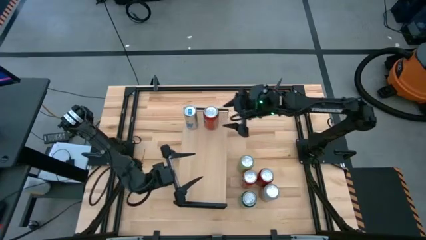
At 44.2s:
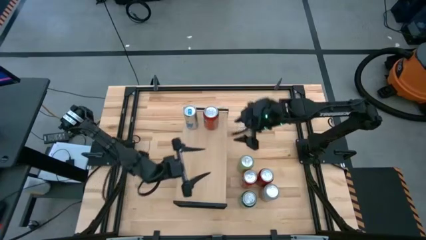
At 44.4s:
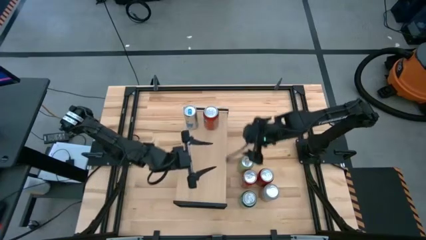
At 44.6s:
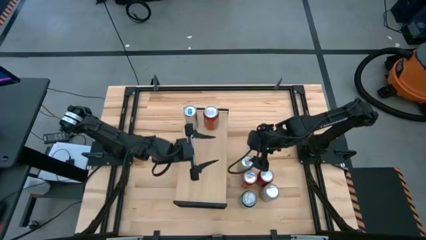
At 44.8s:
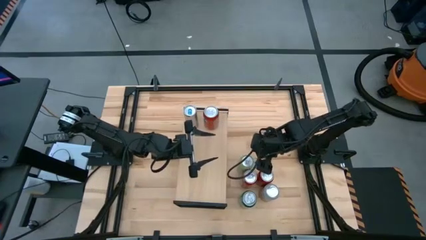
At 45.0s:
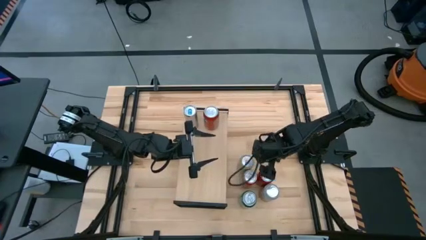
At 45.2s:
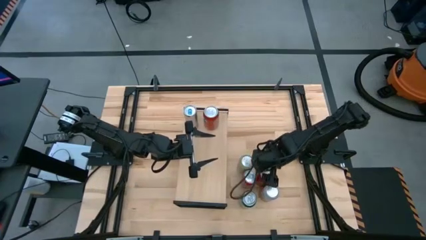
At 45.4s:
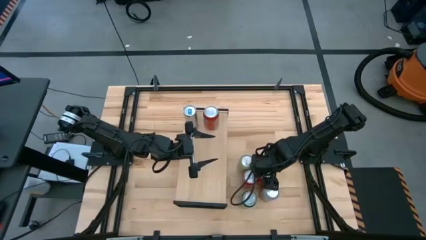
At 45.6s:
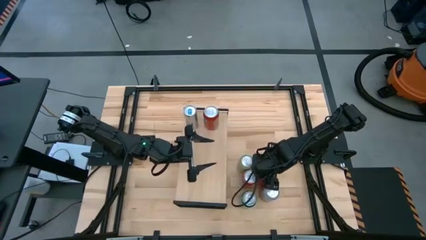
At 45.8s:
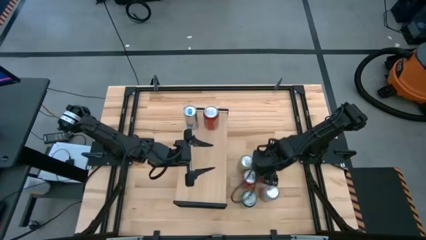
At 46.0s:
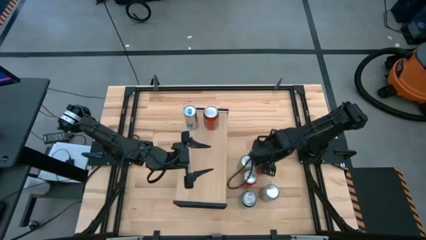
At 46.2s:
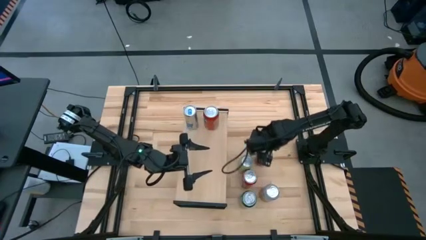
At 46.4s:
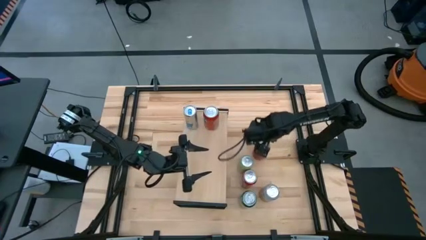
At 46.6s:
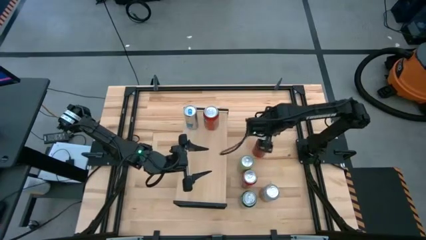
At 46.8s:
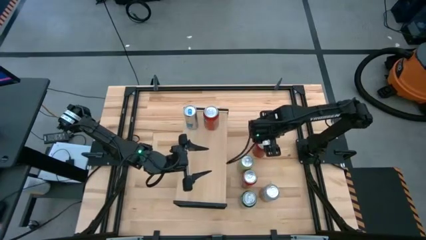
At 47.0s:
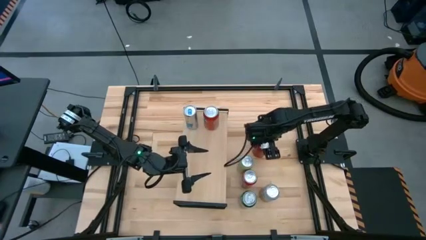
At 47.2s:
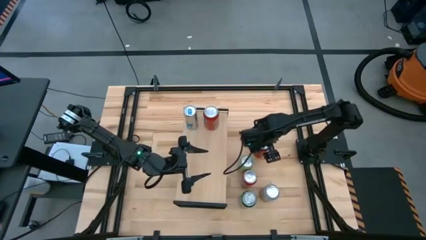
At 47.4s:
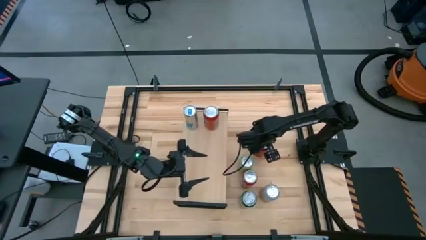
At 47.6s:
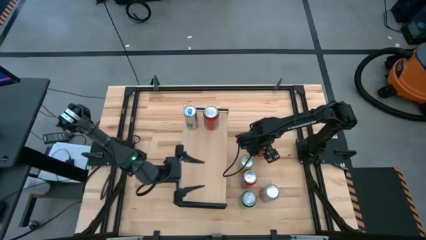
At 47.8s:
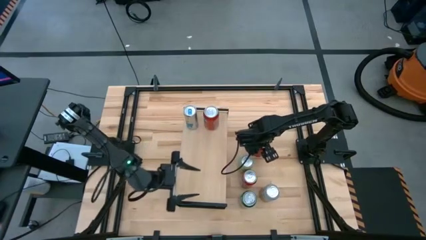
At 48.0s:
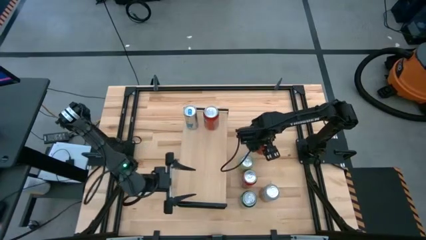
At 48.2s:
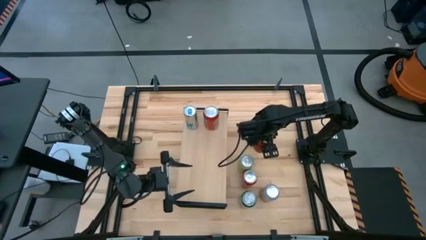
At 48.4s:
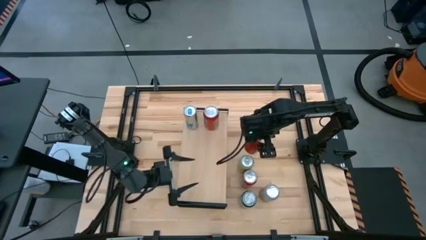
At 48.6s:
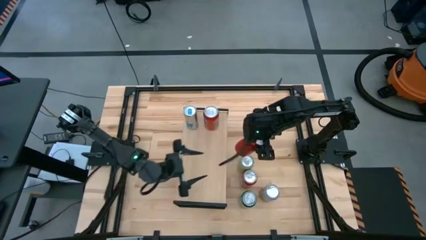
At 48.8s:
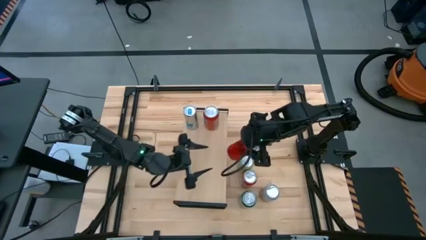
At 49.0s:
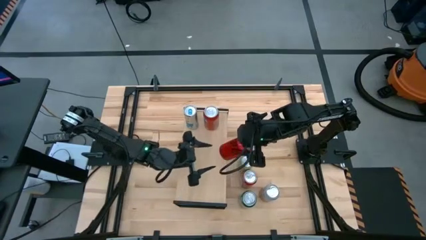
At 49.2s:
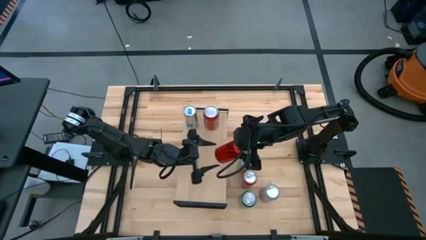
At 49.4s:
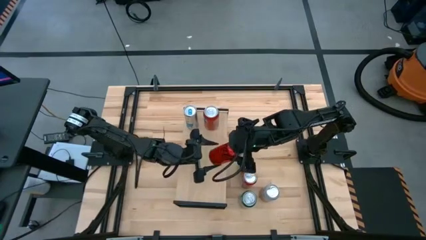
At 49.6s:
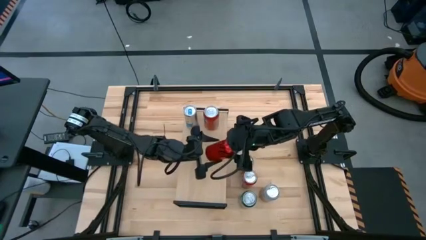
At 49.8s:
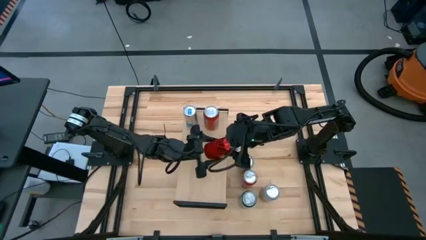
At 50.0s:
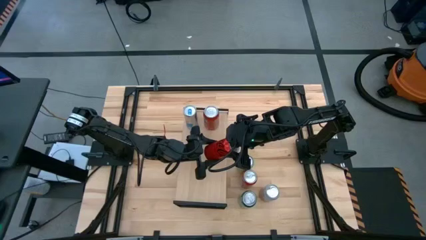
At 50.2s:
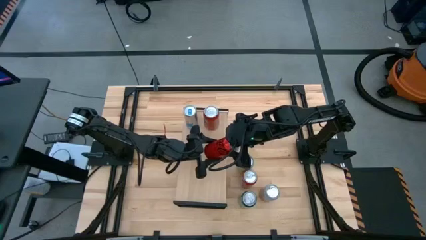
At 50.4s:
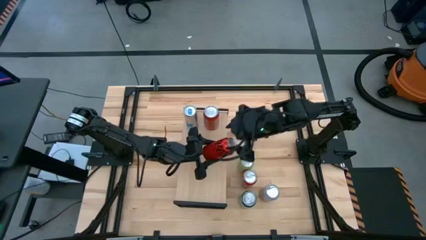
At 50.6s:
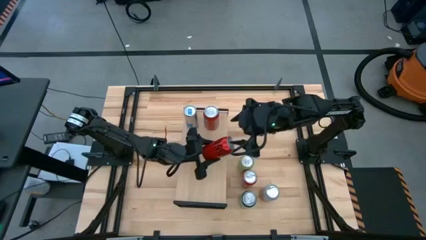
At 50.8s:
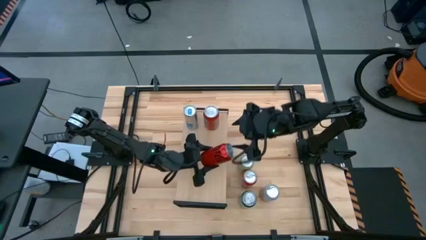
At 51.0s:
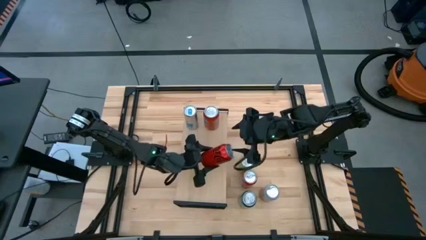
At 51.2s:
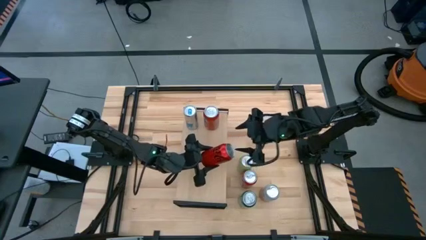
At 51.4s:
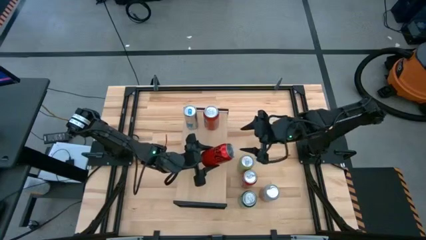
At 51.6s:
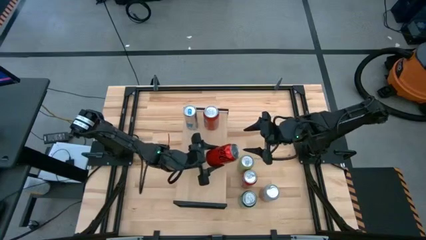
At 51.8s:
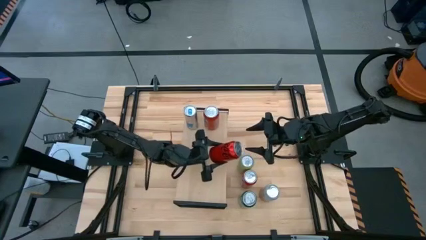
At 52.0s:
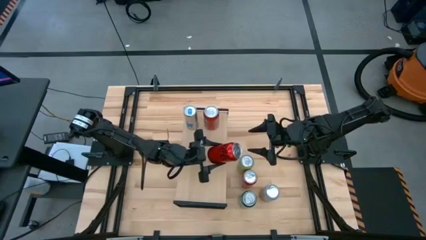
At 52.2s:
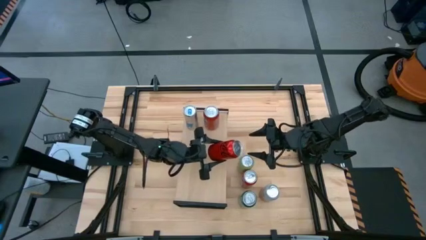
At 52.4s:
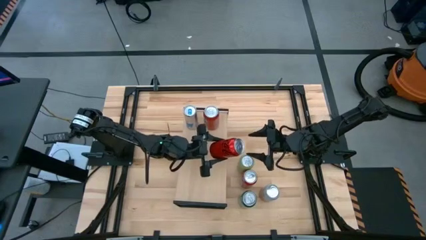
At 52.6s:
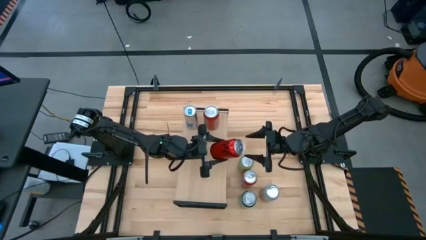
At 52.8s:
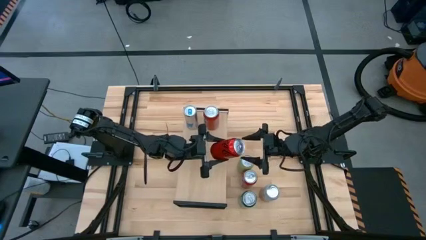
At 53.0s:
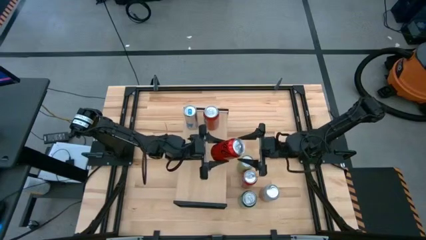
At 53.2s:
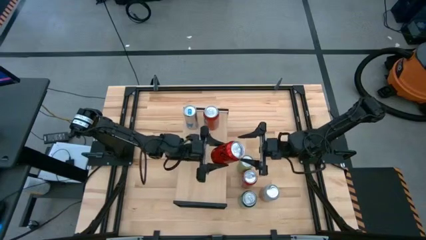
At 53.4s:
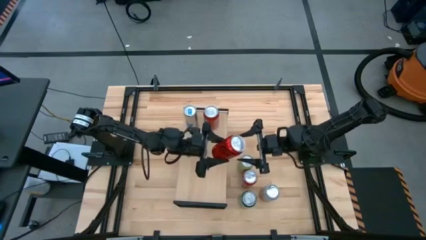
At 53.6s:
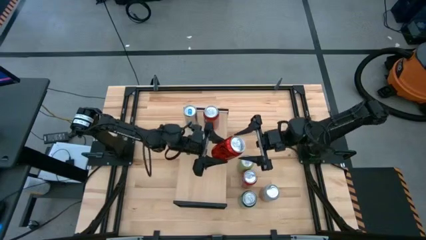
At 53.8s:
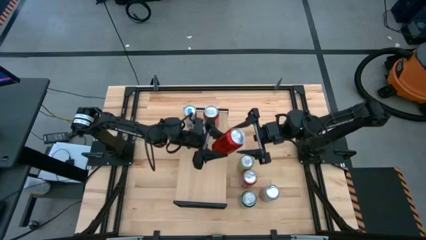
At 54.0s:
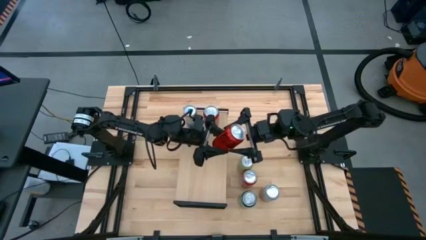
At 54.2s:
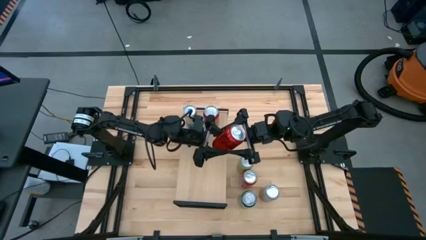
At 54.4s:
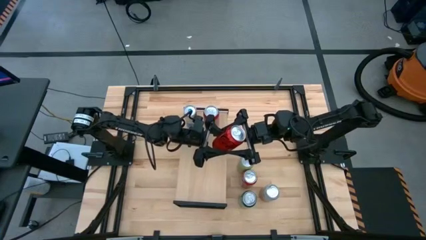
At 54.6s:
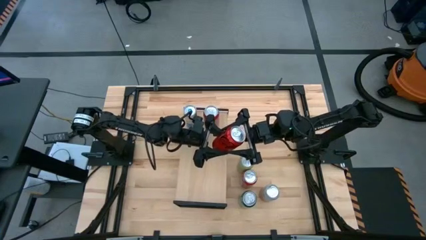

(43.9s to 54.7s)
Task: Place canned beverage on shelf
Put the red black soda can on the shelf
